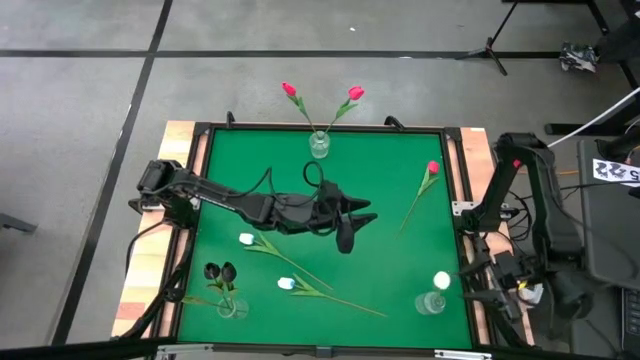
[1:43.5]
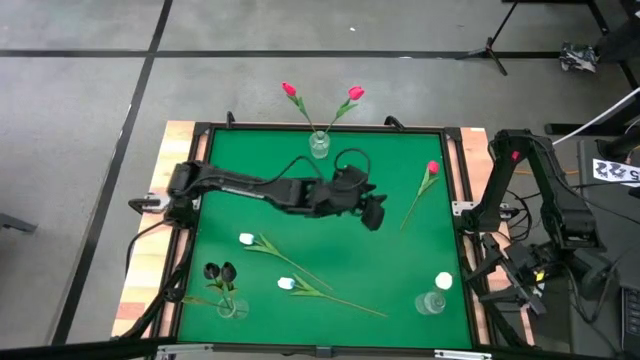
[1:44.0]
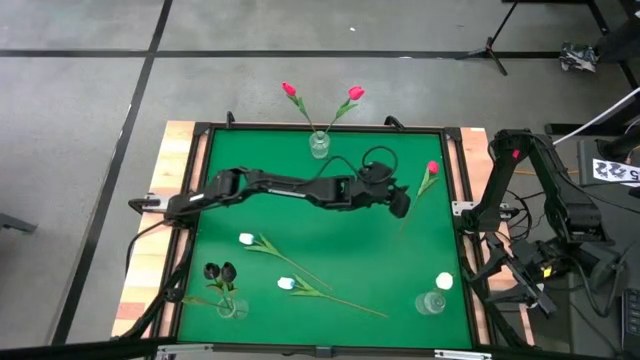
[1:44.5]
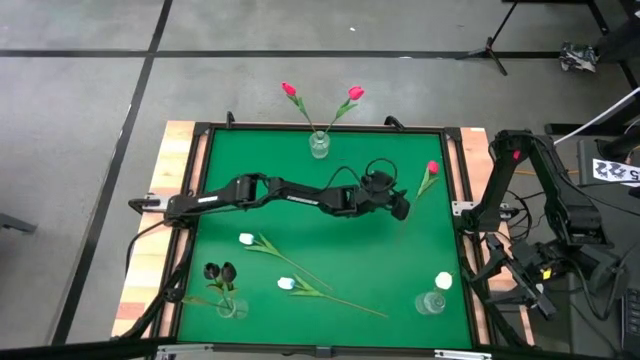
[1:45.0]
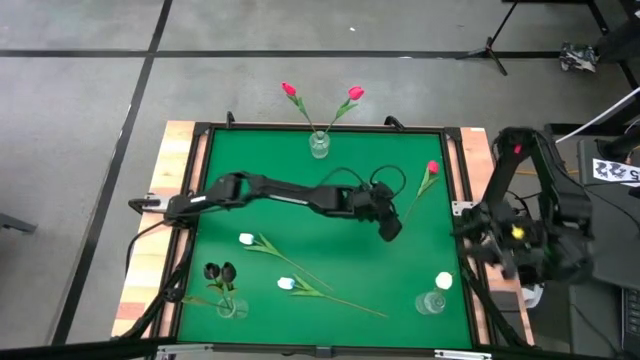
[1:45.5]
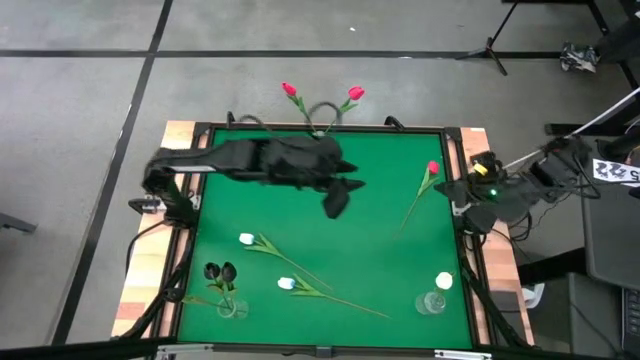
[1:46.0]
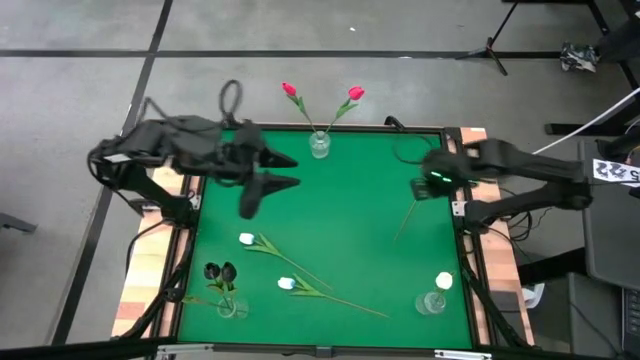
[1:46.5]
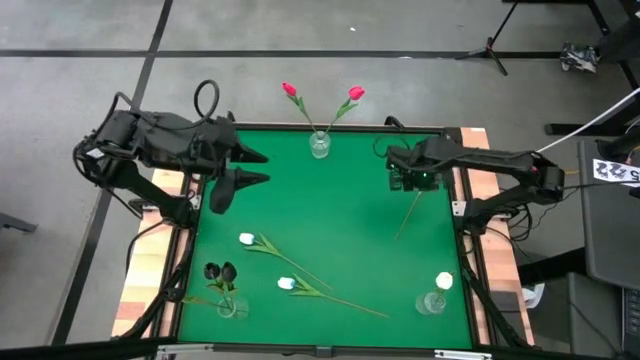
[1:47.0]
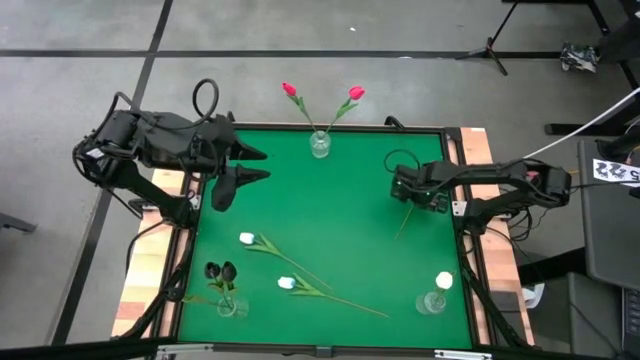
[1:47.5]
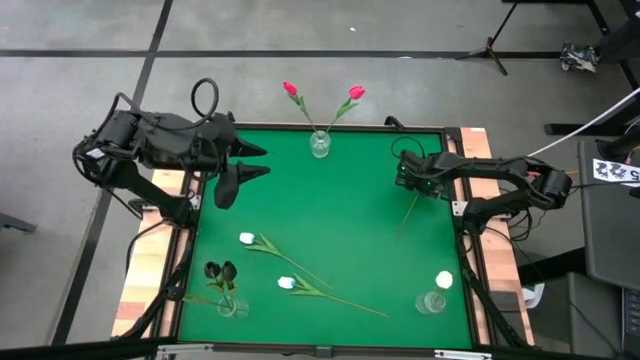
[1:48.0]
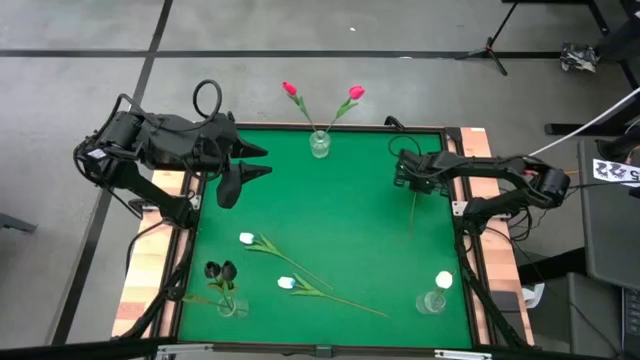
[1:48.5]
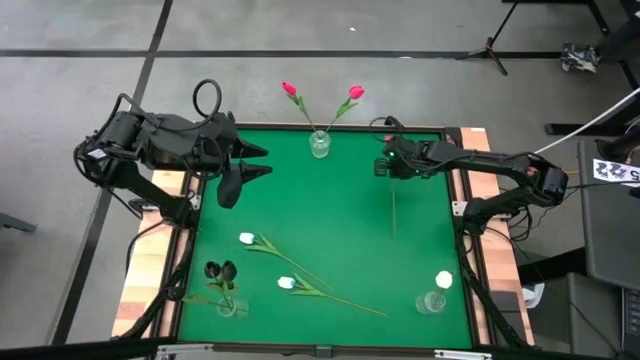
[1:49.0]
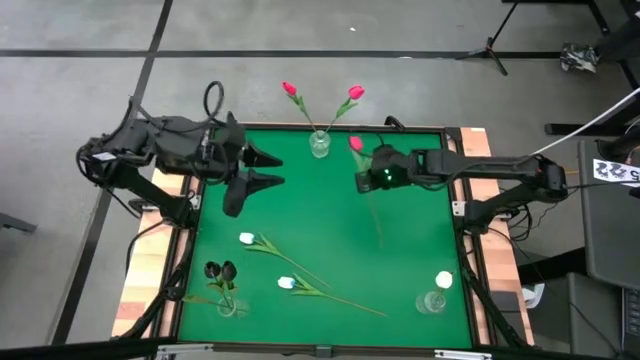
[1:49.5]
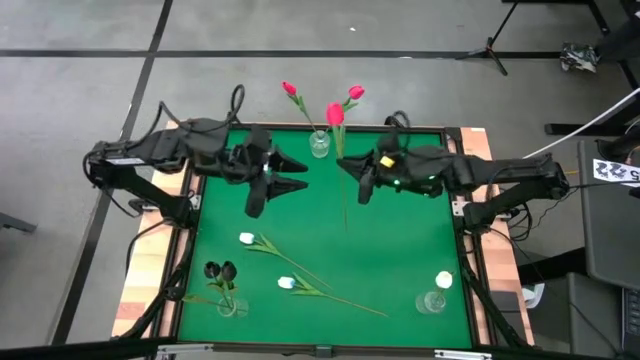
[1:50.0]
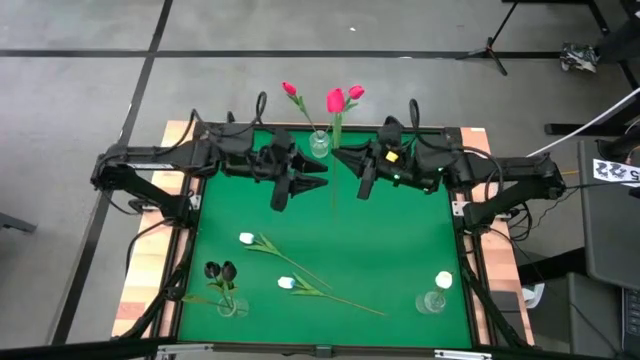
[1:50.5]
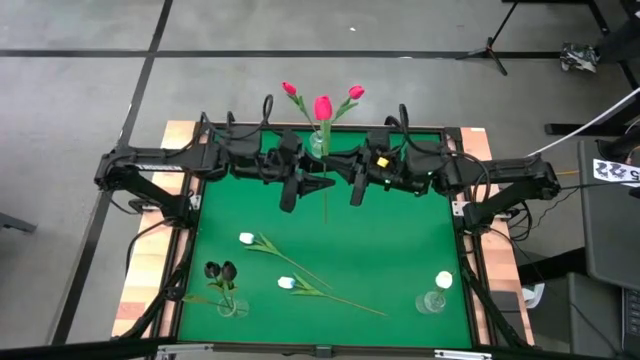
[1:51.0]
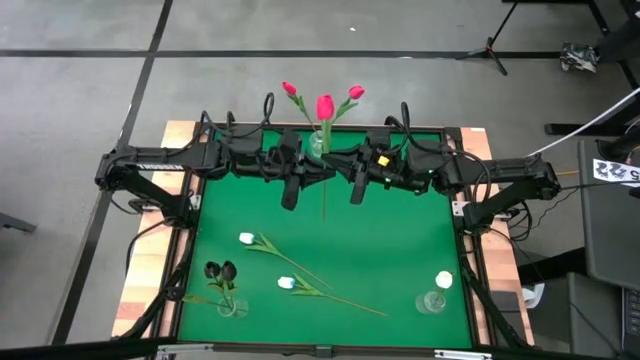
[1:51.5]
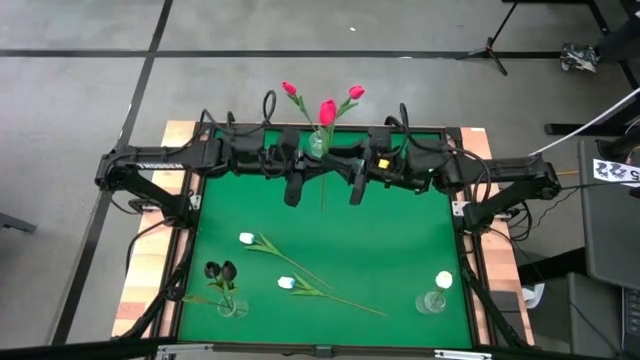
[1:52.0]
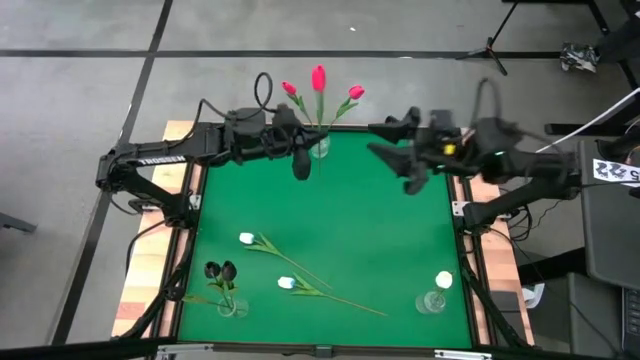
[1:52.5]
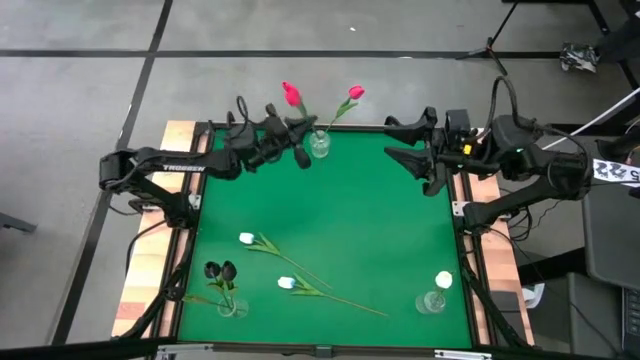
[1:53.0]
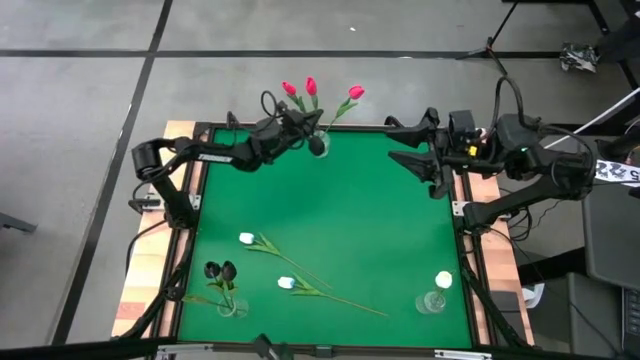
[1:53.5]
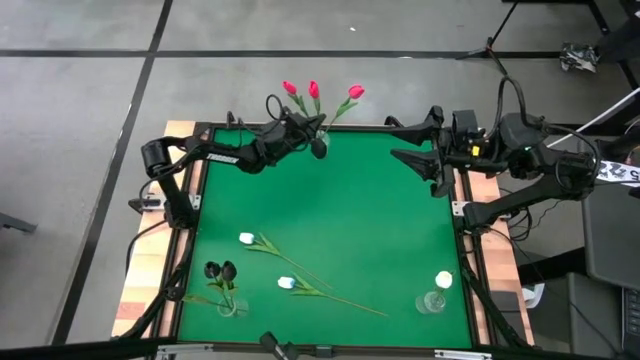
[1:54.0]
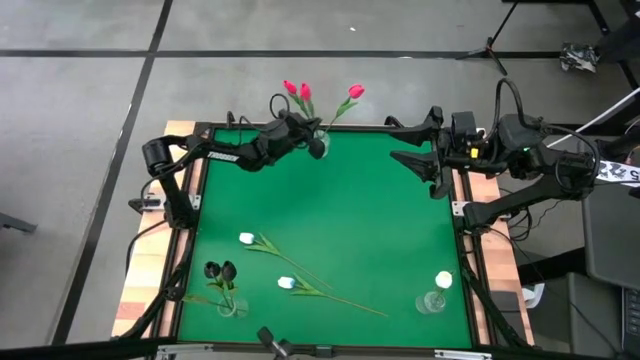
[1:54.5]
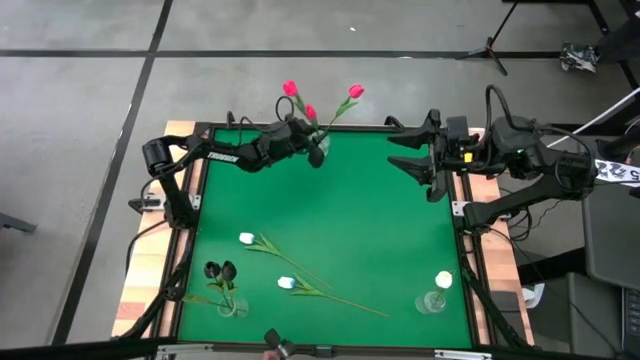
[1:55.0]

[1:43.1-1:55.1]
Task: Sort flowers into vase by color
Put the pink flower into the top transparent vase

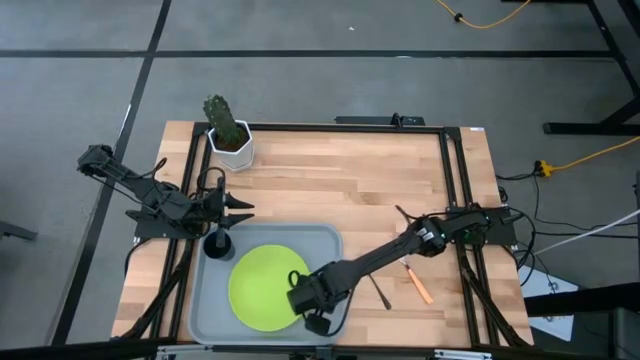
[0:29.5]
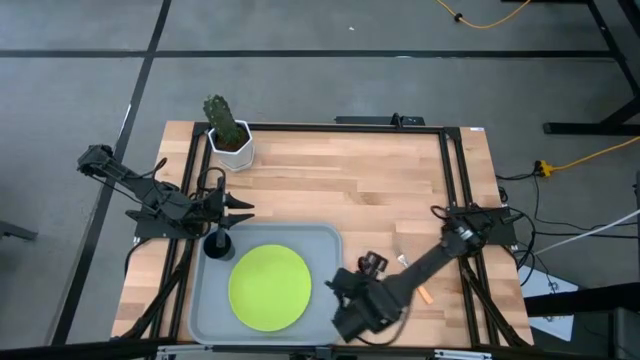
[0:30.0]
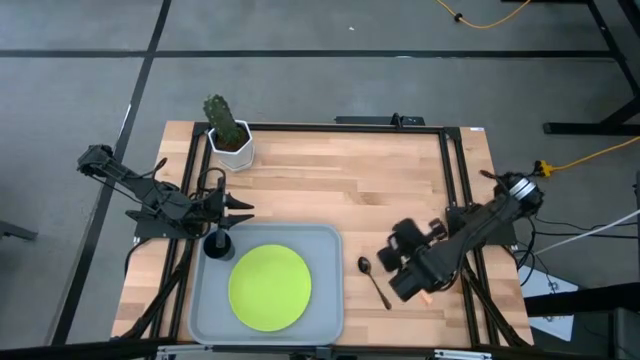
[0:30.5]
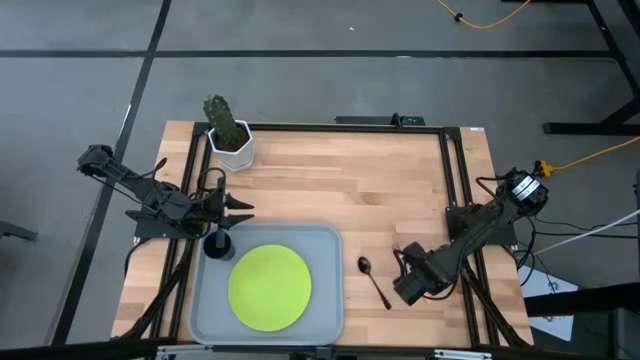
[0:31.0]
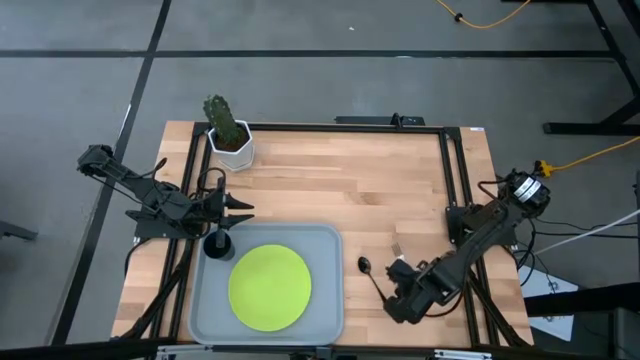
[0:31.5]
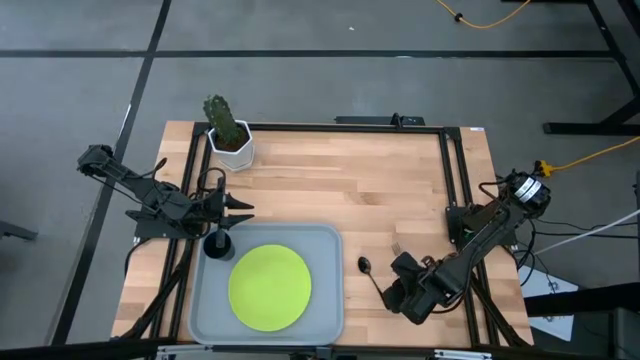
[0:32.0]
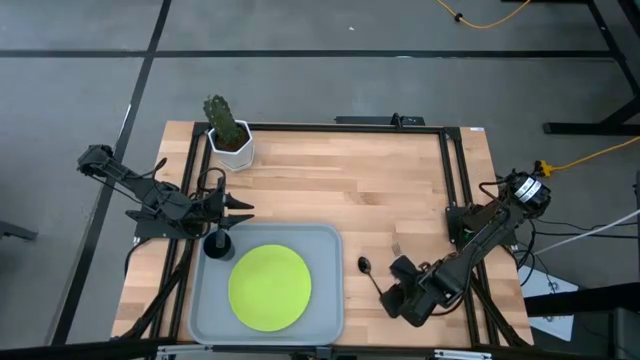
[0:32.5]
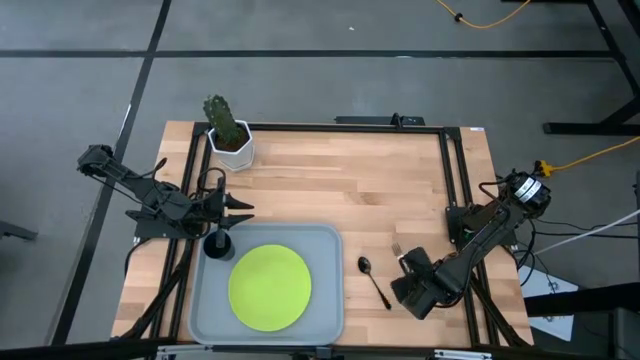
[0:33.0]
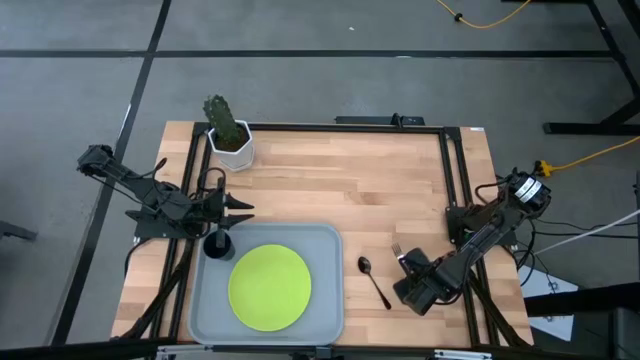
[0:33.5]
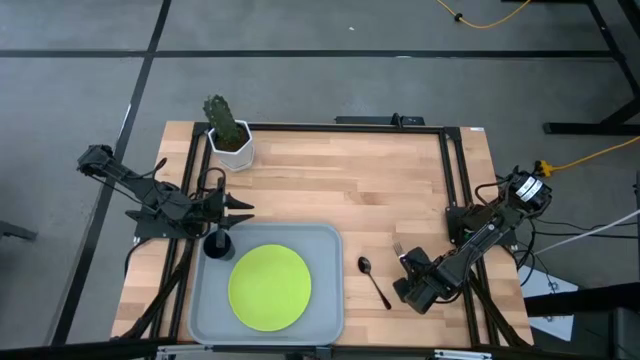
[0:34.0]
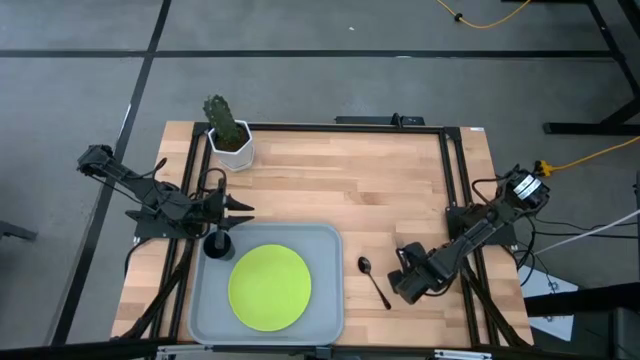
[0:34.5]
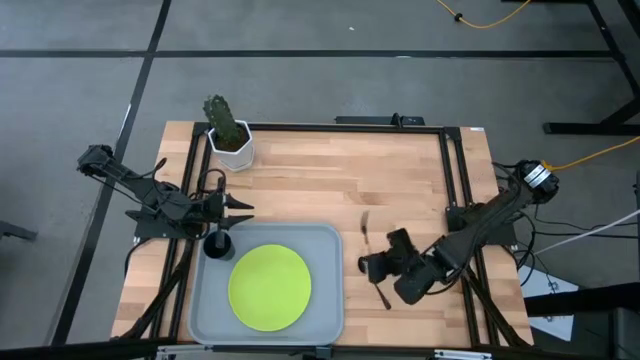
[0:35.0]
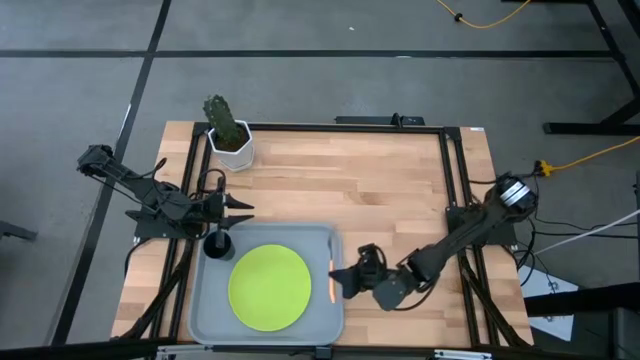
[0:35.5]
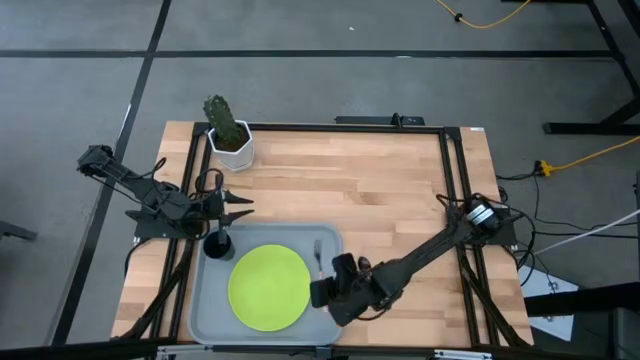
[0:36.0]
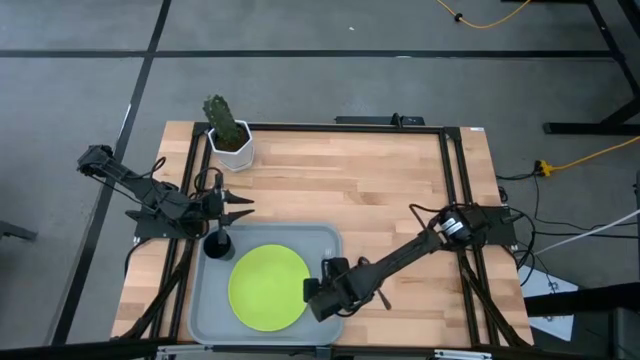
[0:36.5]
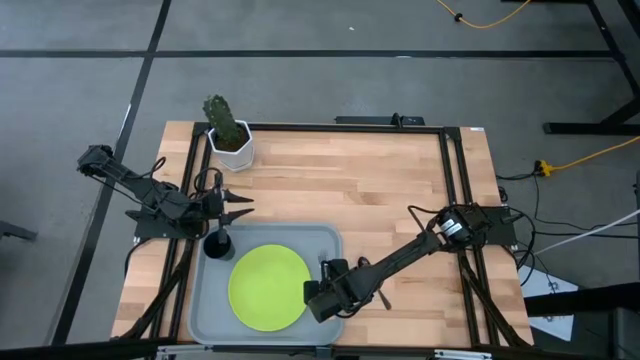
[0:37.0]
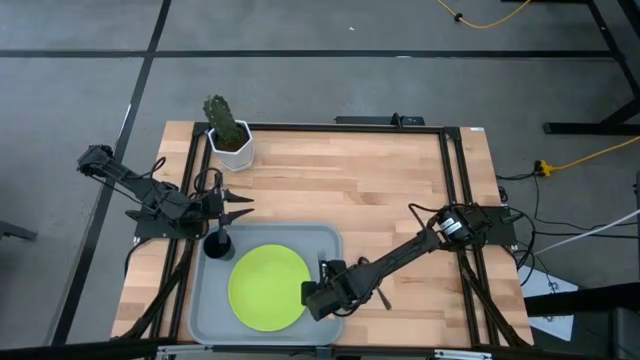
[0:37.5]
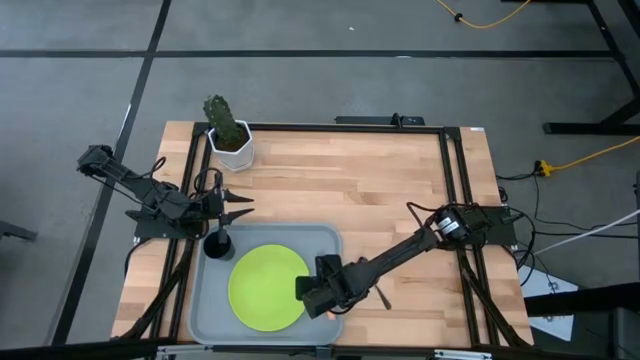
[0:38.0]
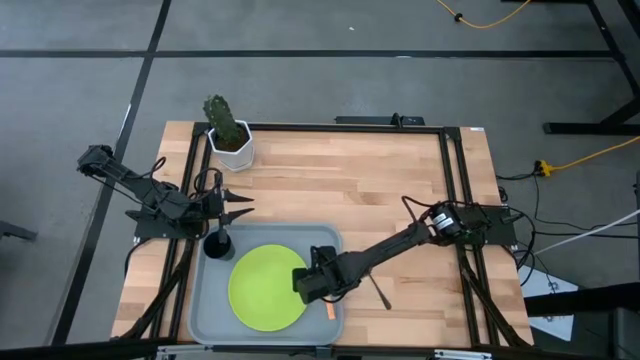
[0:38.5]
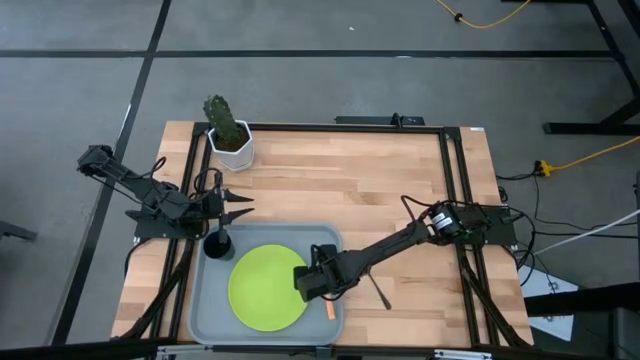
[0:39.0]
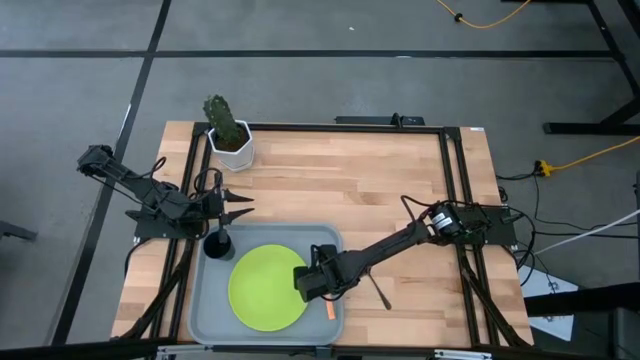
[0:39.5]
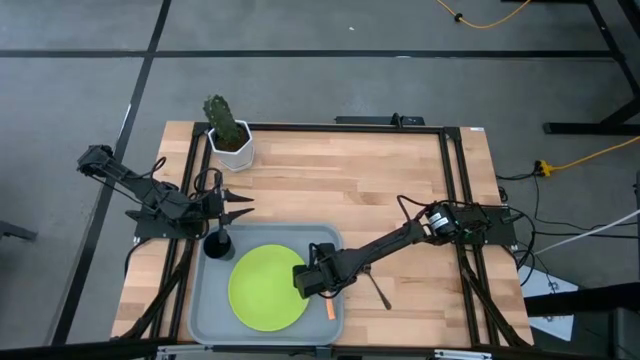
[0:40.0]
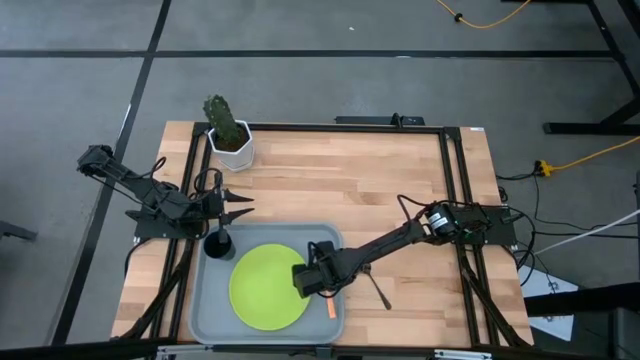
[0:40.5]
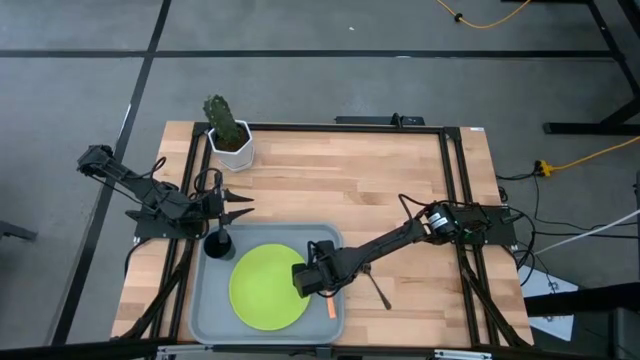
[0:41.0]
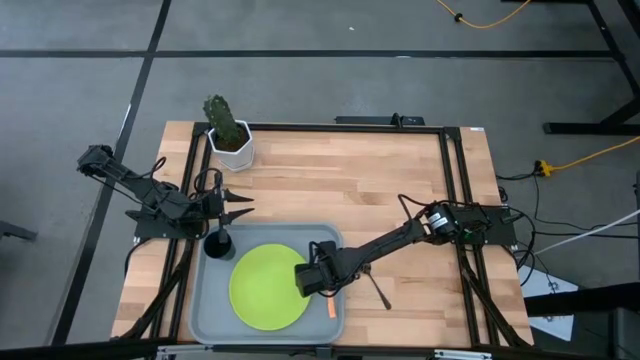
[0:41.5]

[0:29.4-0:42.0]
Task: Pick and place plate/cup/fork/spoon on tray
Put the orange fork on the gray serving tray to the right of the green plate
